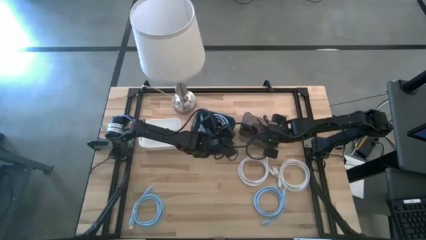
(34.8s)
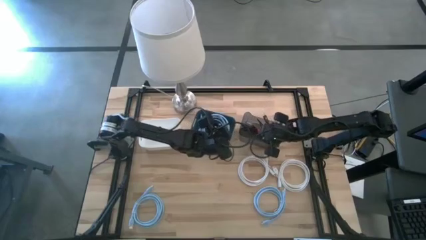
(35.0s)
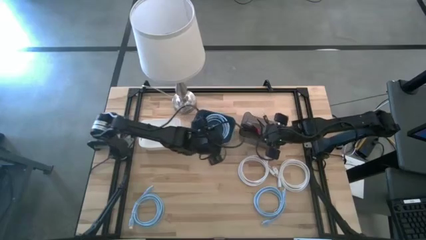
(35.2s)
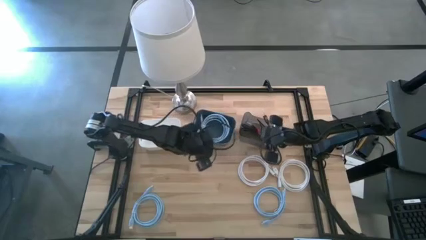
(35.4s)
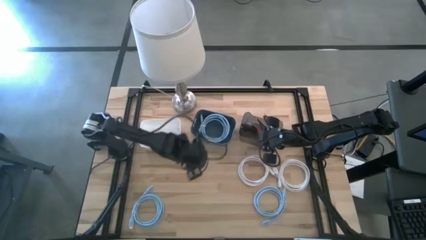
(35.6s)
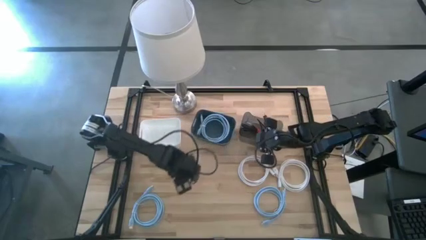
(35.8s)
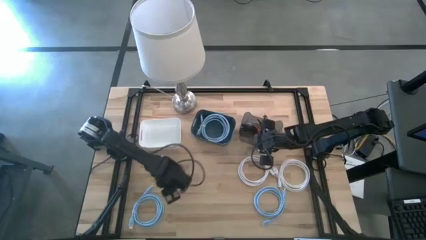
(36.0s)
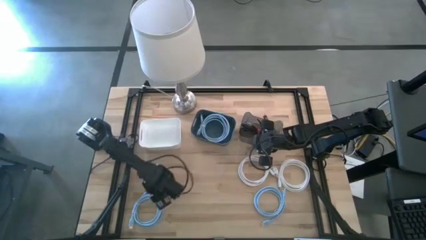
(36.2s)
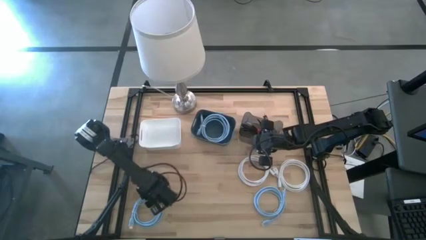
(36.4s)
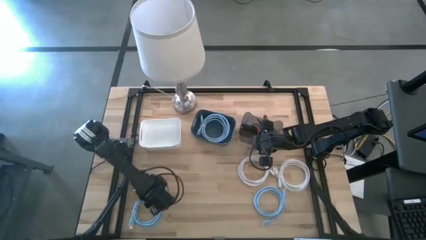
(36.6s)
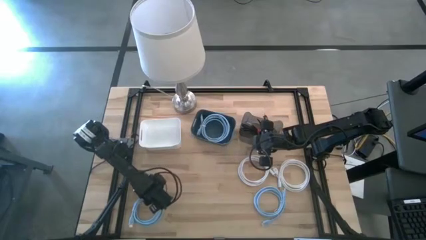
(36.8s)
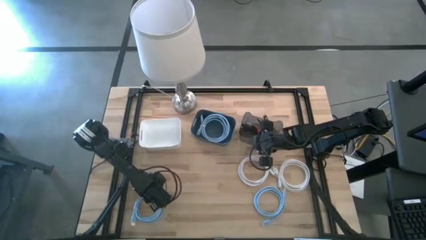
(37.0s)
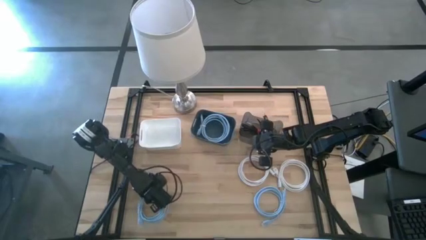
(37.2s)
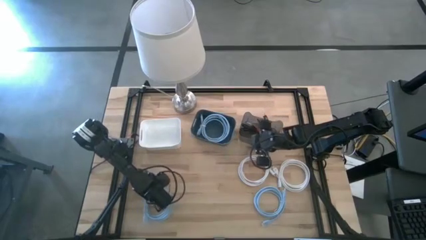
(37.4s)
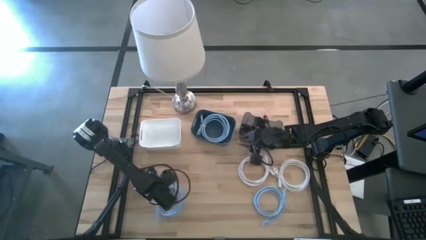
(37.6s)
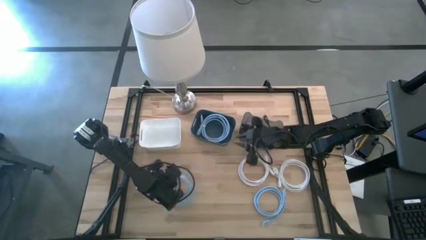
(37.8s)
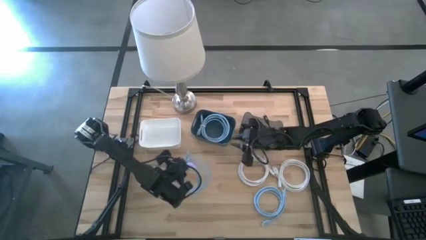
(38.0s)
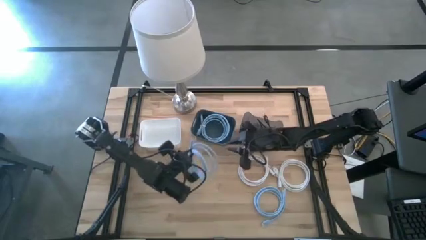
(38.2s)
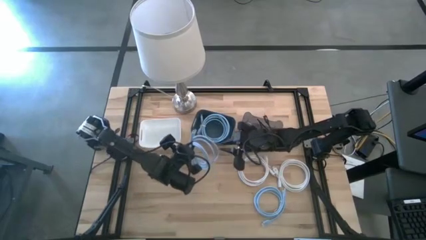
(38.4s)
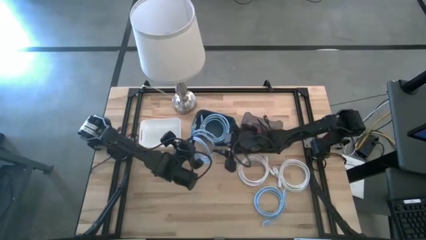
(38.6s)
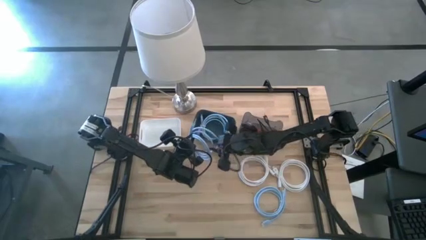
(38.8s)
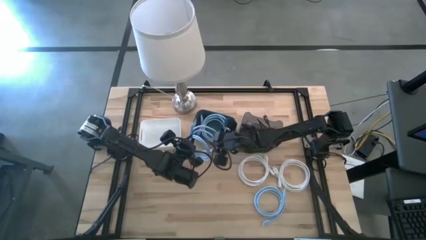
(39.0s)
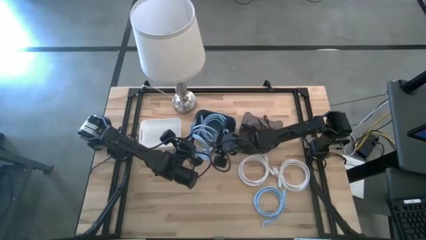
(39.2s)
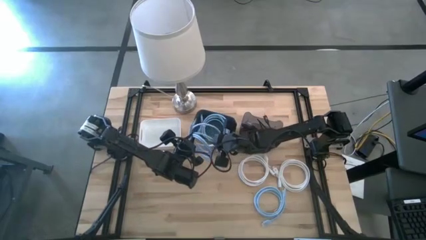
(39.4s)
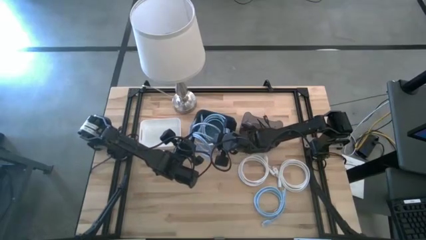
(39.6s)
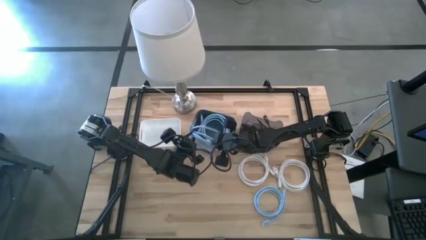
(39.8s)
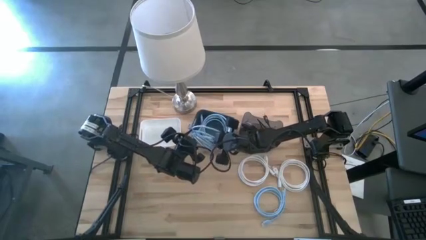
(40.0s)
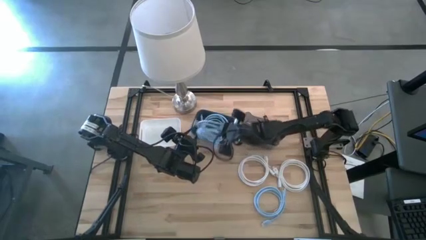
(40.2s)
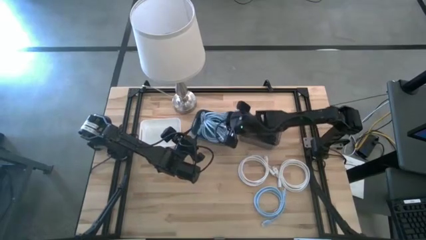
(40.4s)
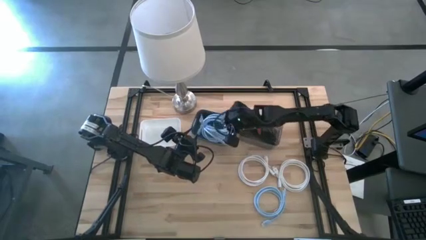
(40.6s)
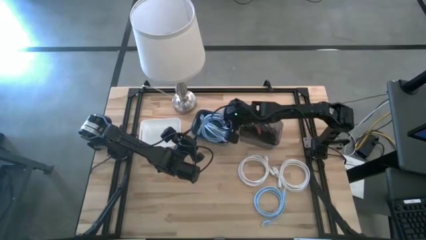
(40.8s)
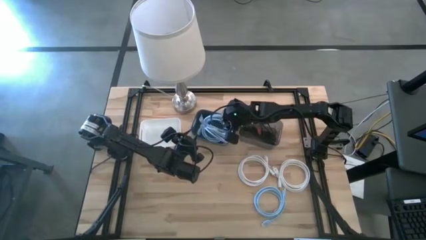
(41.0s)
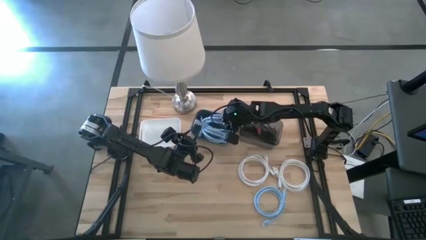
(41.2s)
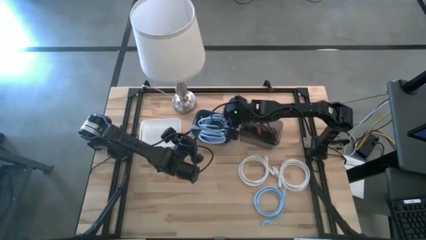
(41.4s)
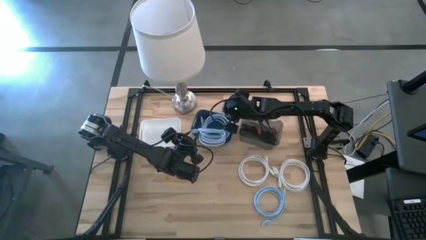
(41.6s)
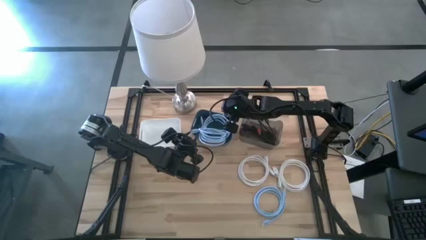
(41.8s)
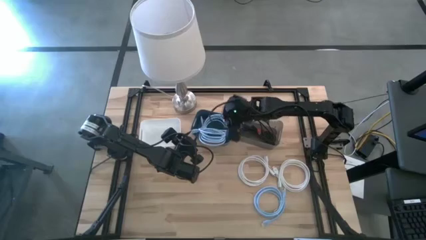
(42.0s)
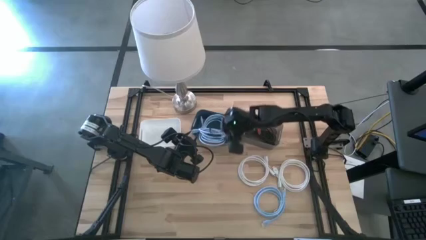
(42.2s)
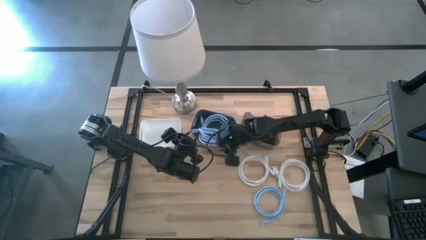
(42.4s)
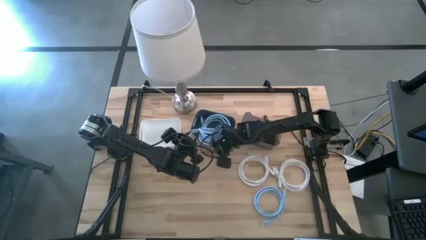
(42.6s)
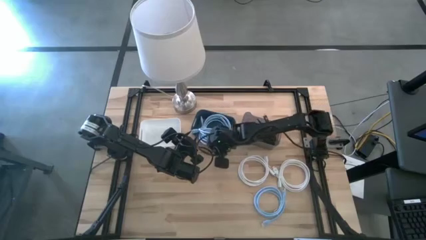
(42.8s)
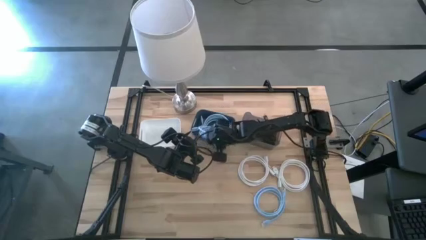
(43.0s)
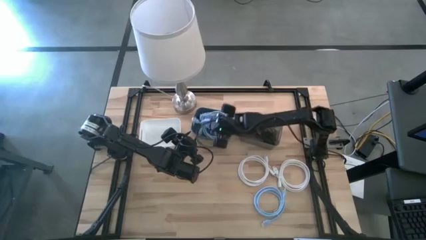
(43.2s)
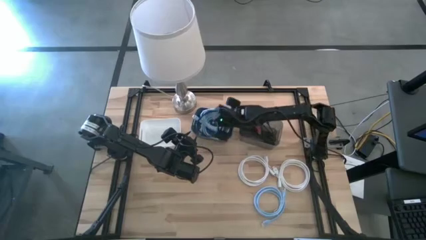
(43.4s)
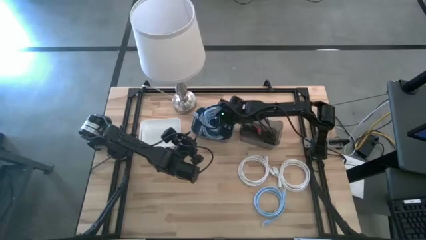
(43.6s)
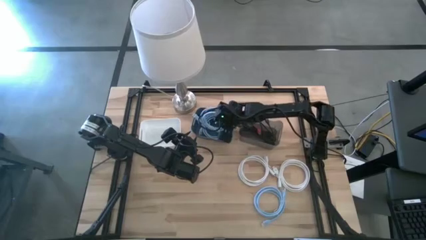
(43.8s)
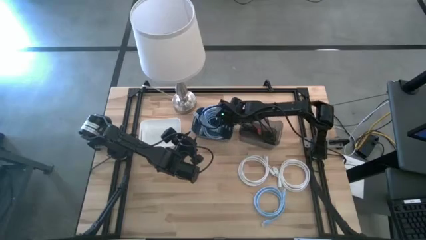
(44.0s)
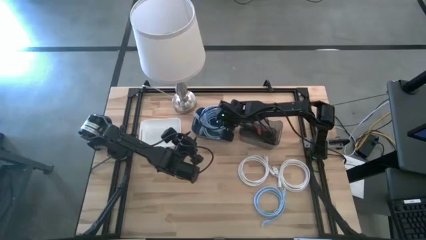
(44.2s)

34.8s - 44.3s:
Task: Pick & Place USB Port
Put the left blue charger cable into the blue bin

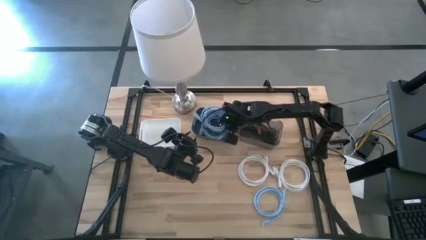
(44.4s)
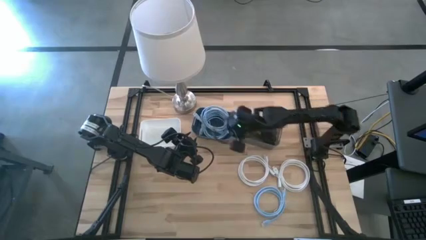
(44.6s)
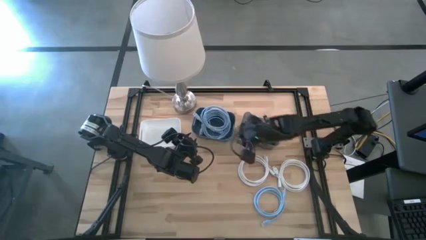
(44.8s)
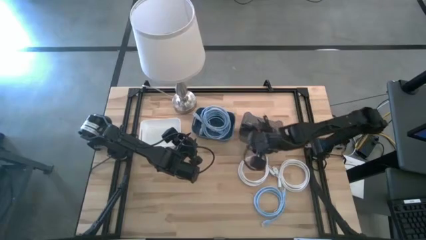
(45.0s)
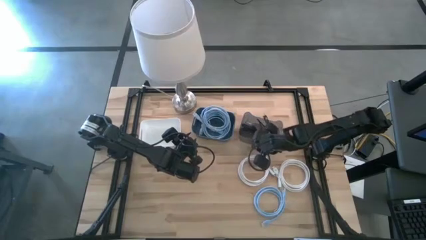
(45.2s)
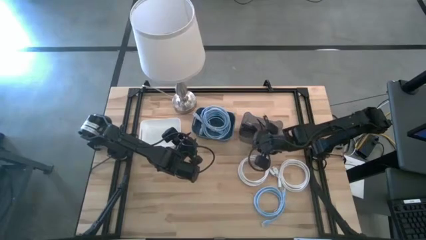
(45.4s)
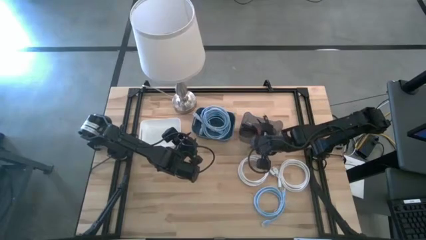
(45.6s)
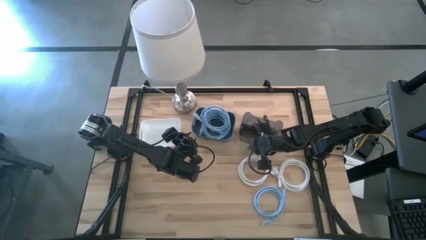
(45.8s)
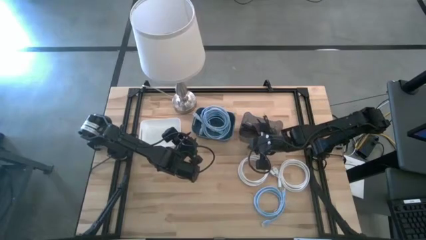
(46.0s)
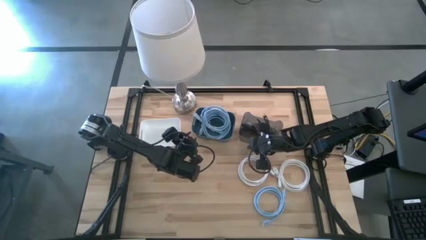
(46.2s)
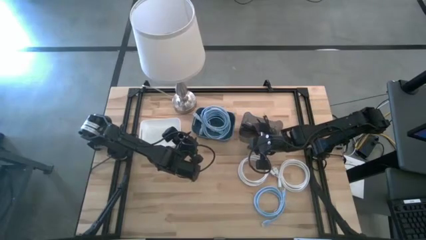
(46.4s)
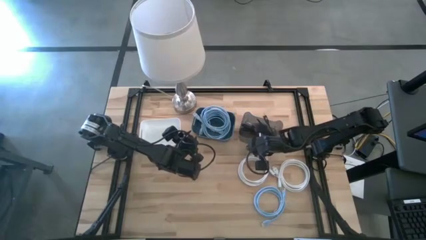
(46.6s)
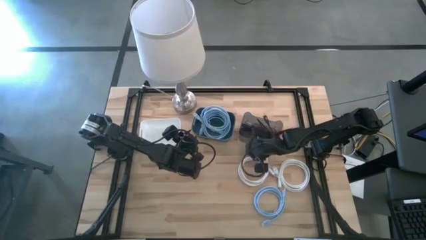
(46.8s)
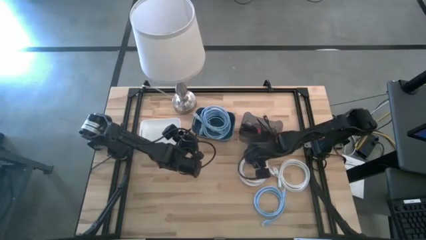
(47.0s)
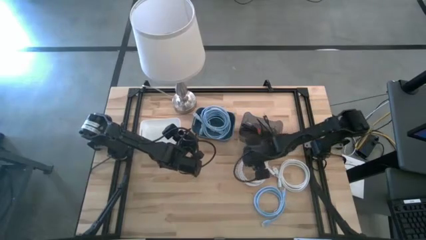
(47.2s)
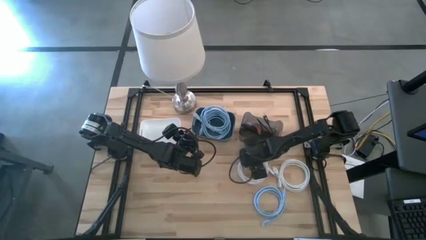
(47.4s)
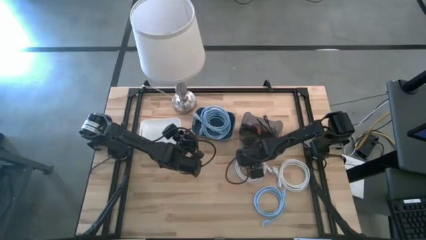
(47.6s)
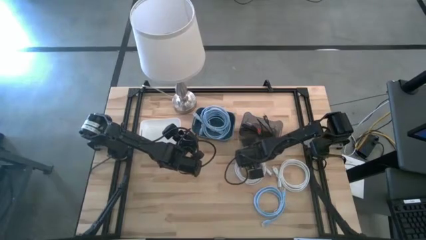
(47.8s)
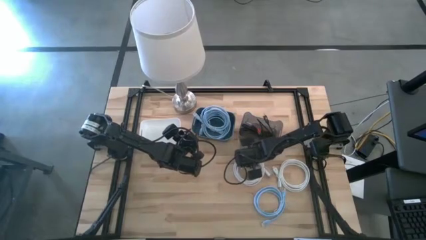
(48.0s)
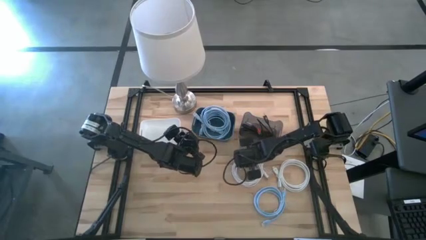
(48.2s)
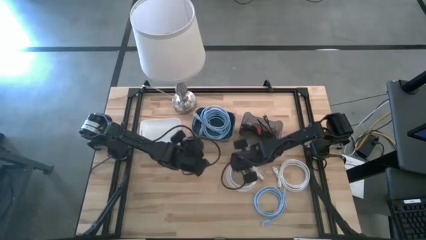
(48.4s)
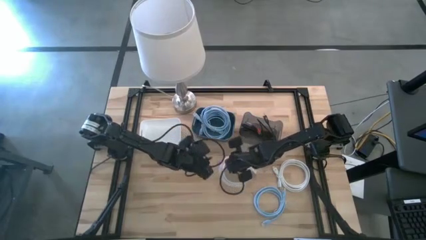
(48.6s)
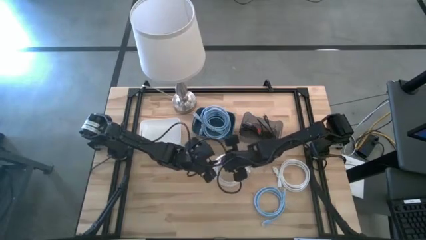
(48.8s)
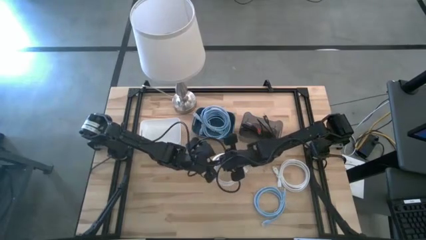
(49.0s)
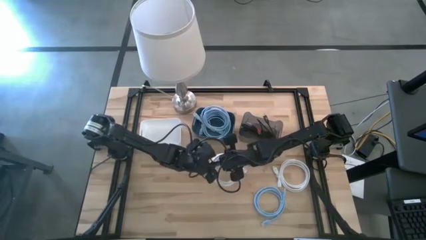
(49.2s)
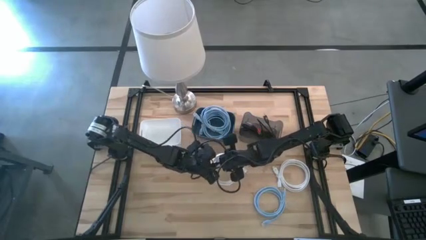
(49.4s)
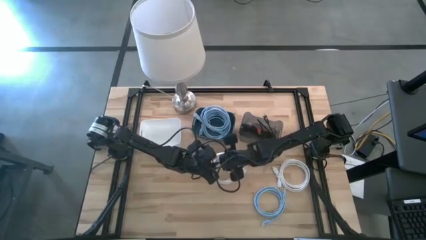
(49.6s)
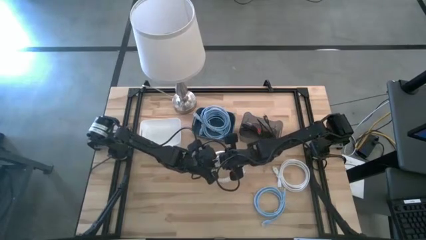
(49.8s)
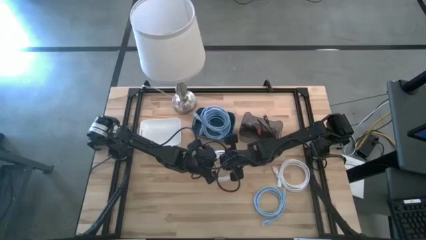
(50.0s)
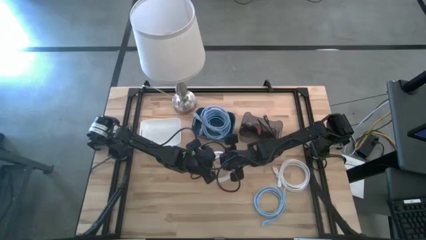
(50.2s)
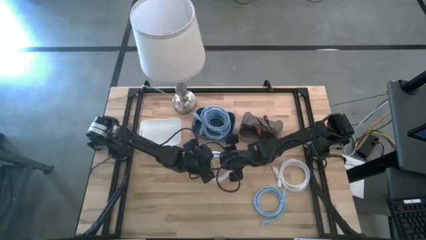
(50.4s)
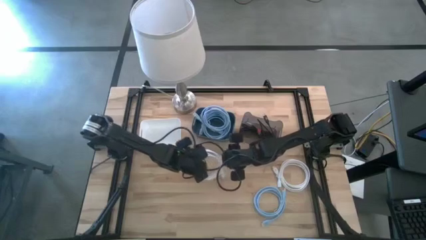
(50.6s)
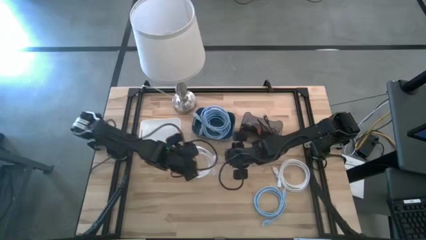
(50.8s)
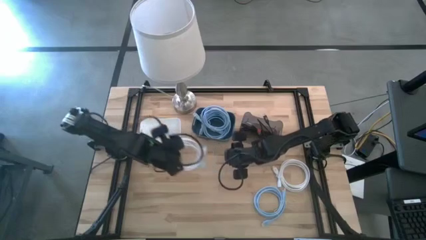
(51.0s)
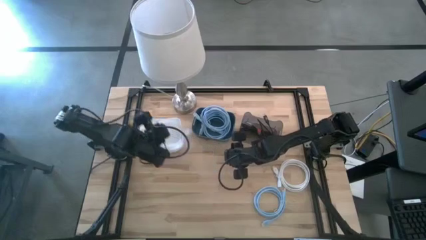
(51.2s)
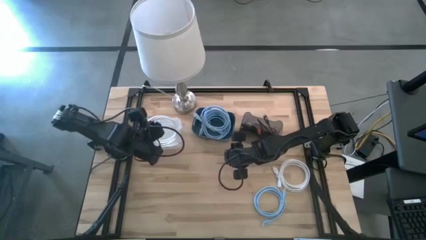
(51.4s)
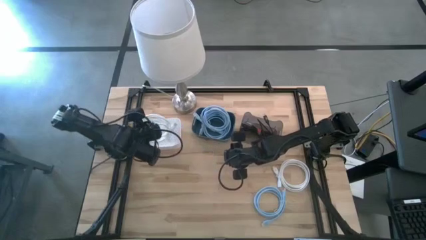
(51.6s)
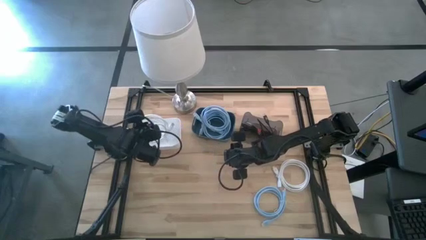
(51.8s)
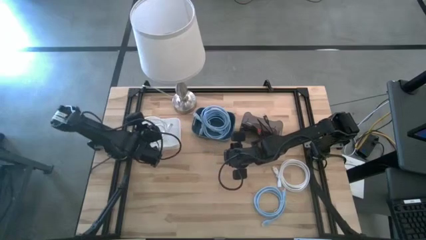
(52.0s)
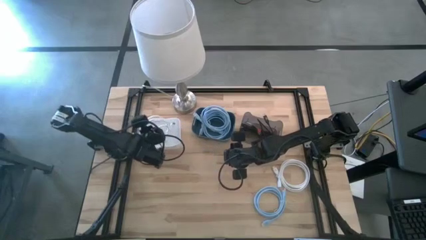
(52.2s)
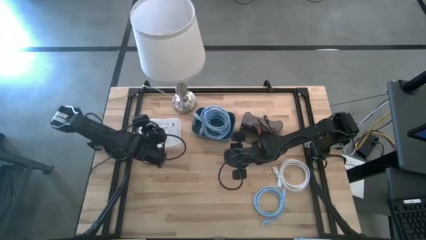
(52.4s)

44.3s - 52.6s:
Put the left white charger cable into the white bin
